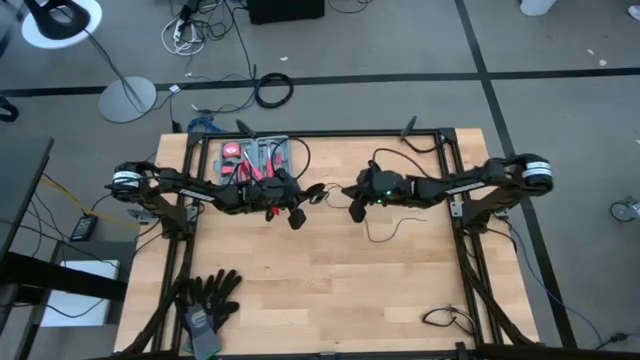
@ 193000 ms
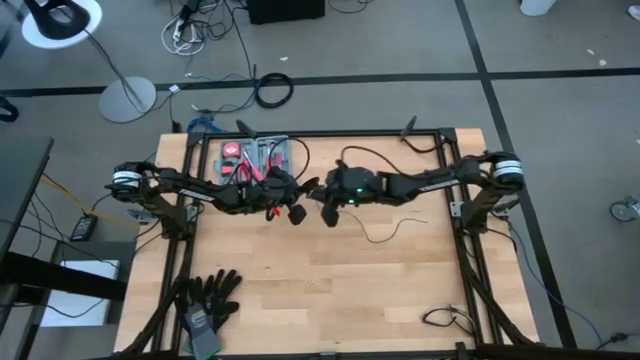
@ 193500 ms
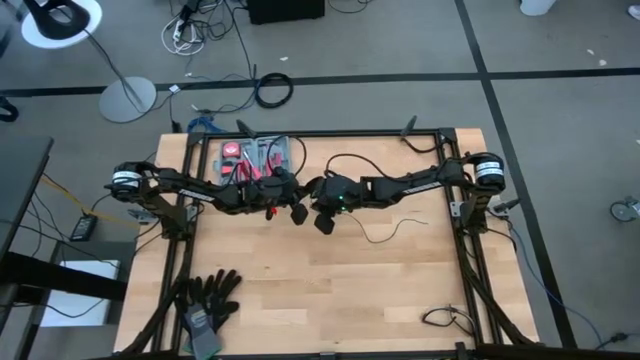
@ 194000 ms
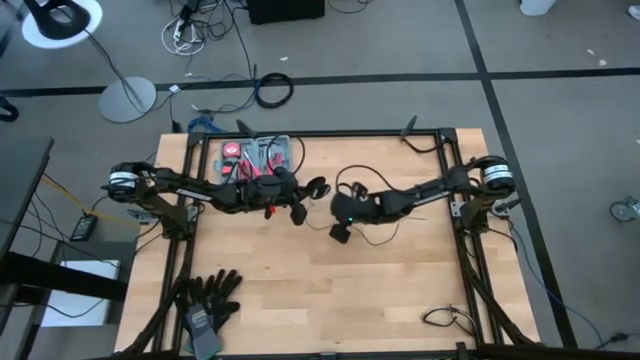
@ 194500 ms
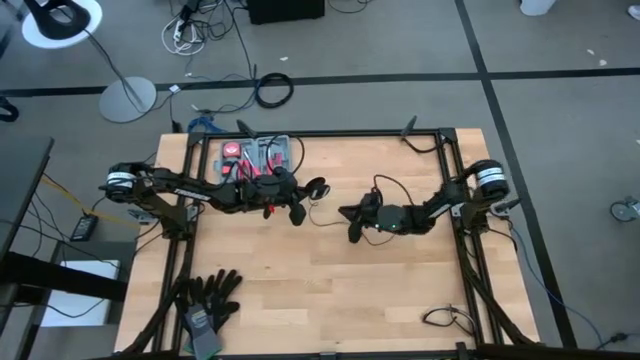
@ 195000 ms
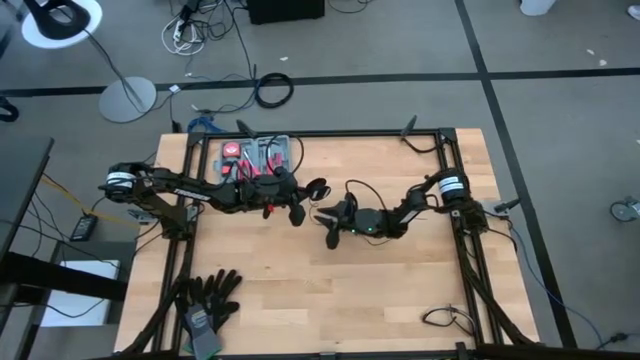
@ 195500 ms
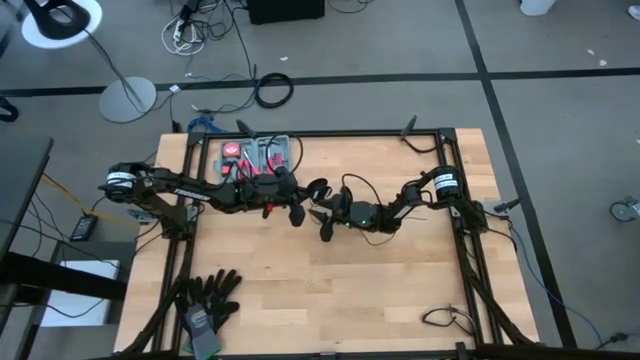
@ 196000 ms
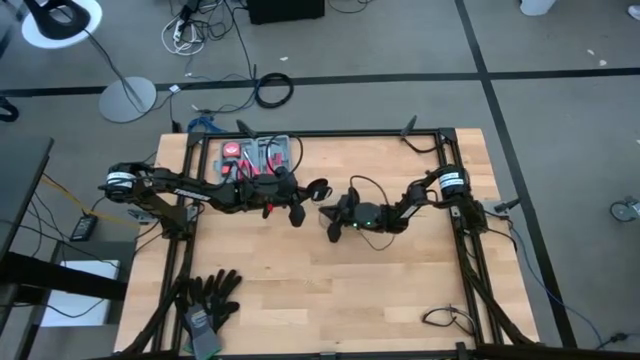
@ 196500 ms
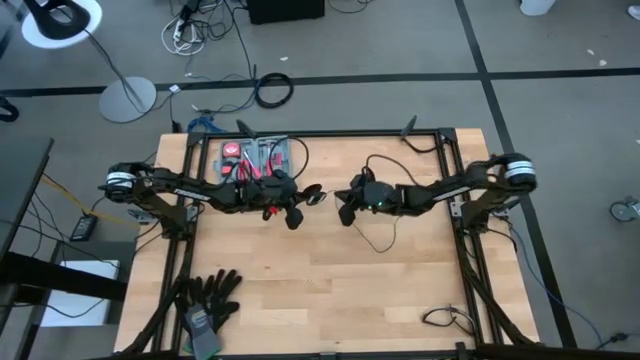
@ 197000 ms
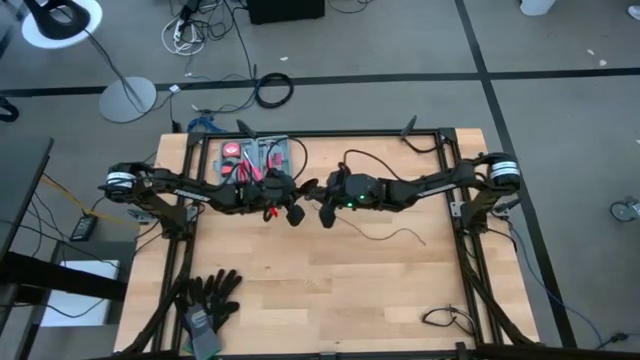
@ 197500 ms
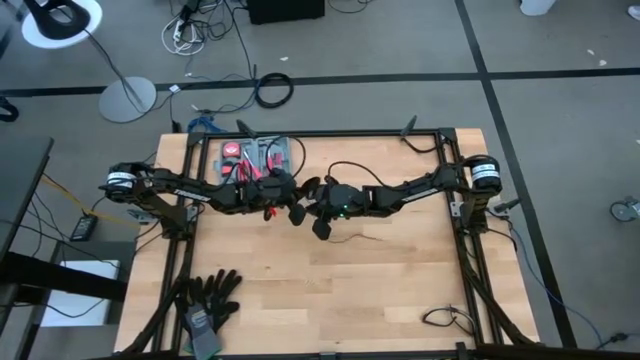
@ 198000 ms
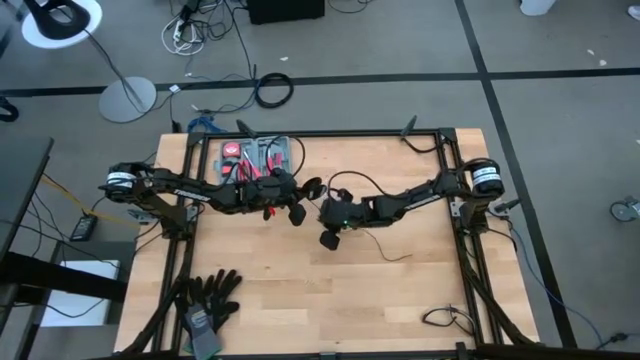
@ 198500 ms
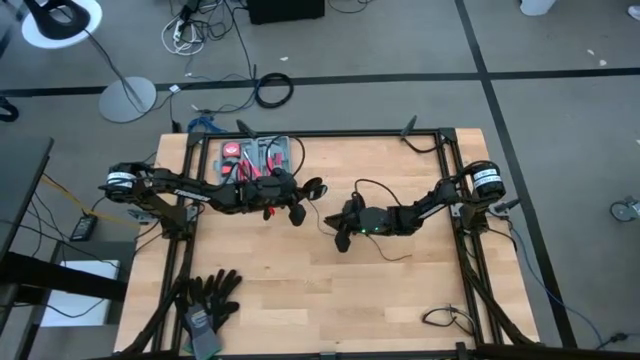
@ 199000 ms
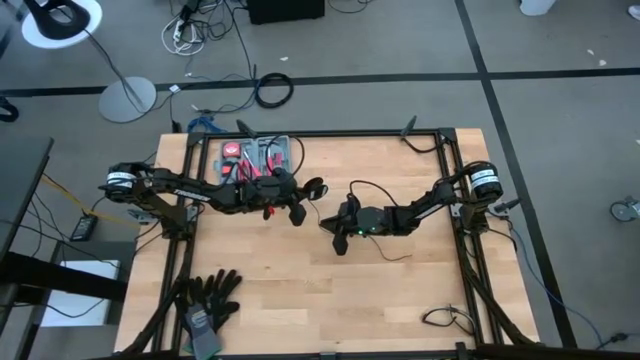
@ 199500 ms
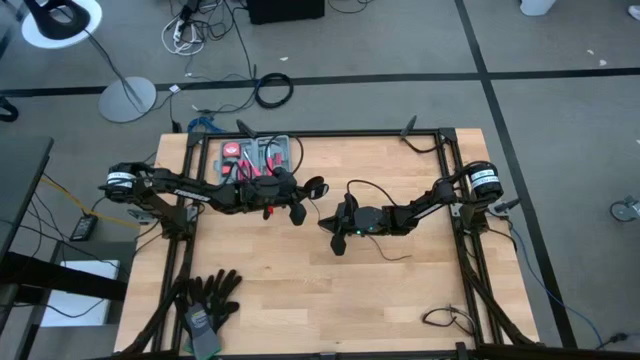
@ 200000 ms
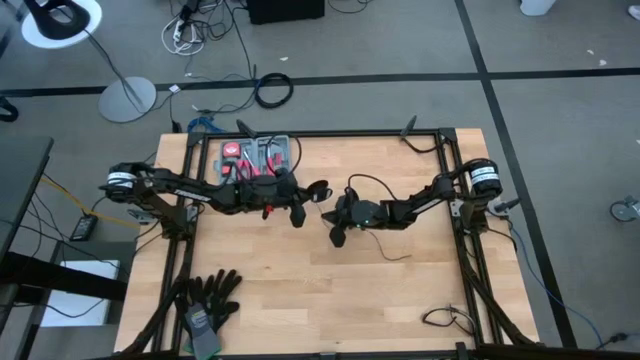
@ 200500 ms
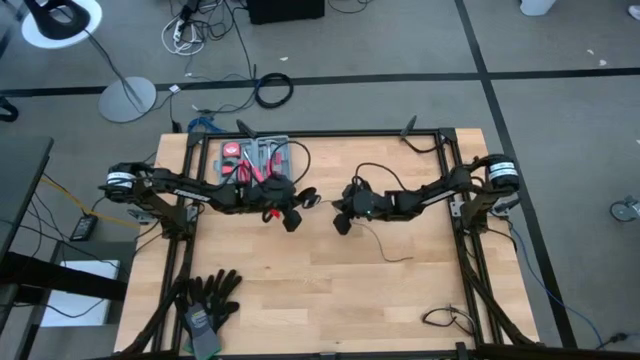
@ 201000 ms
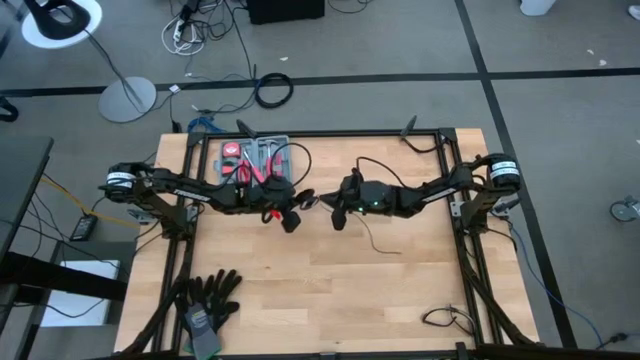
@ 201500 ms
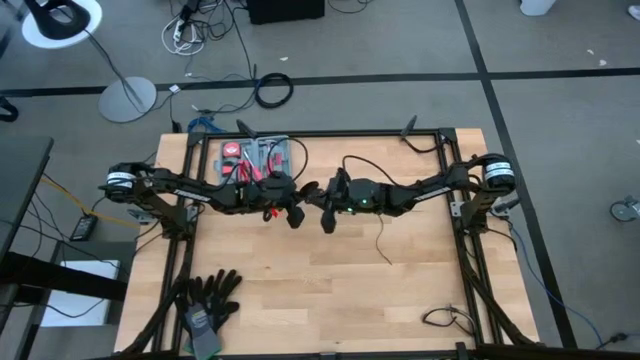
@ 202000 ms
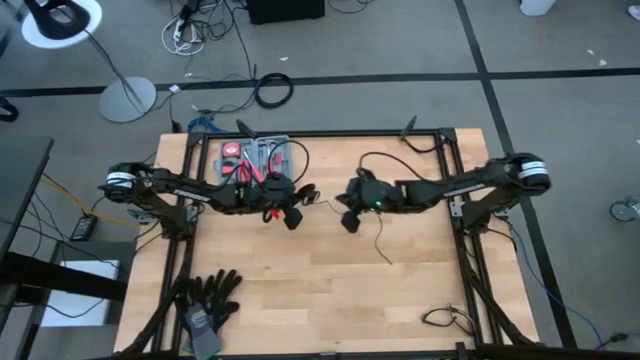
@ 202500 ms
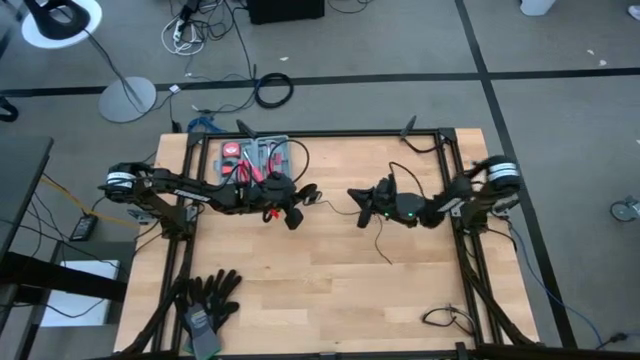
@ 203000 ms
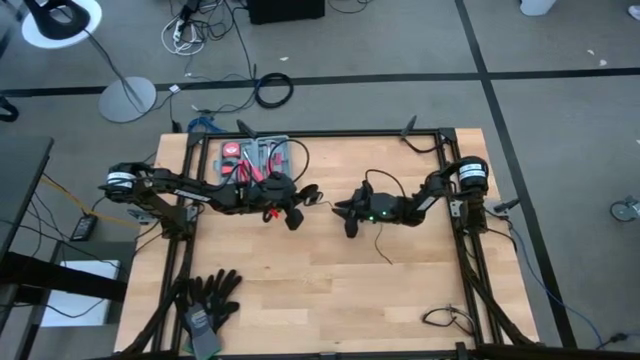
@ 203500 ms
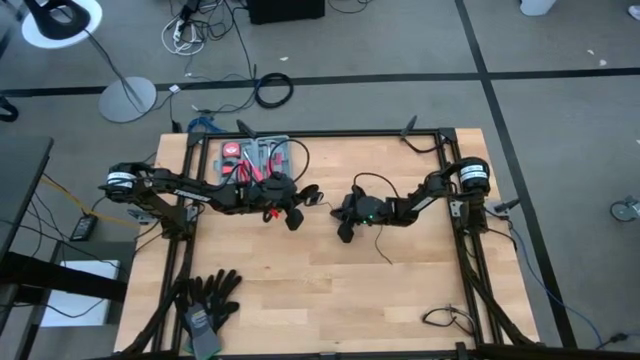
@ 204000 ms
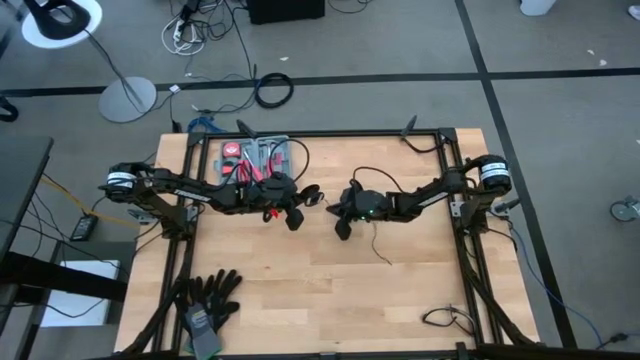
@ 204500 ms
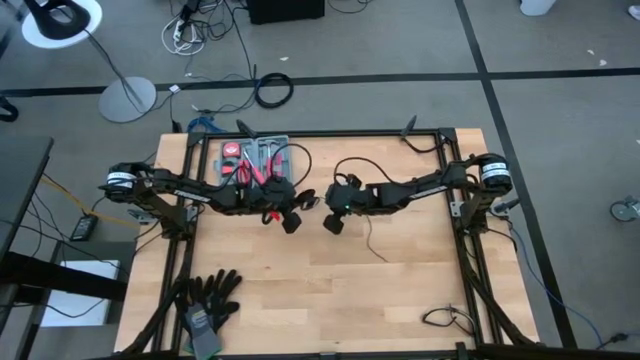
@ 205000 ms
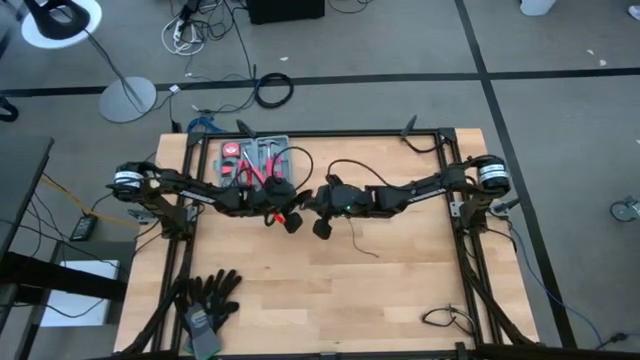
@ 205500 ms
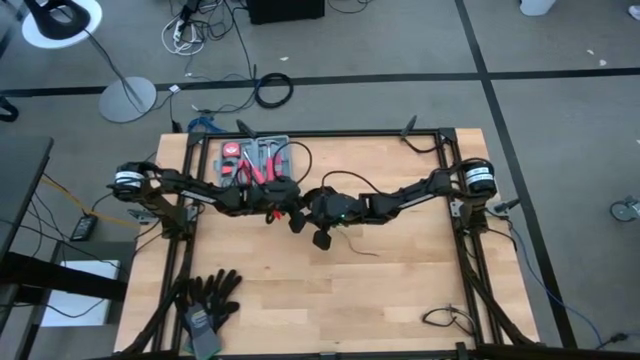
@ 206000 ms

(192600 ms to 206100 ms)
Task: Coil cords
Coil the black cable wire on the spool

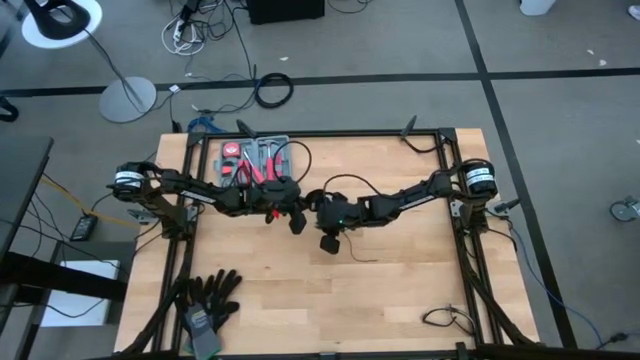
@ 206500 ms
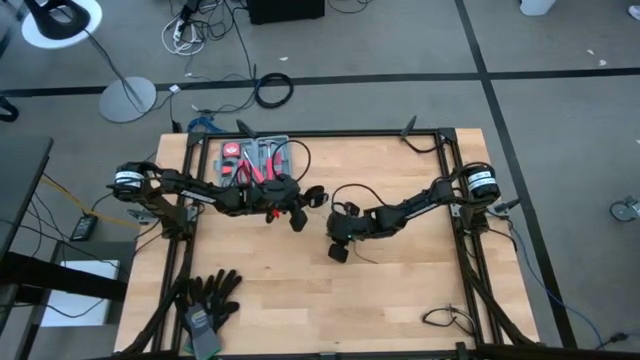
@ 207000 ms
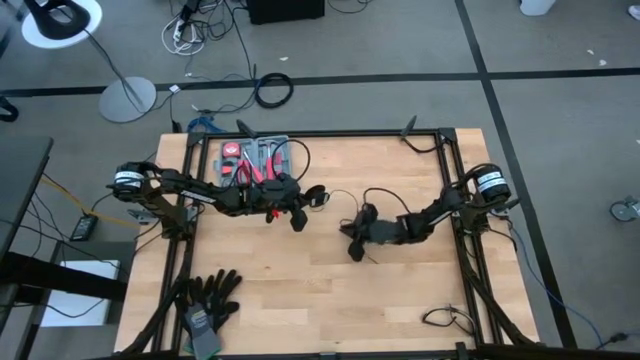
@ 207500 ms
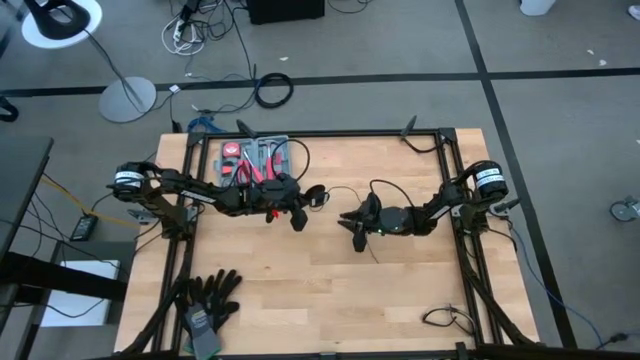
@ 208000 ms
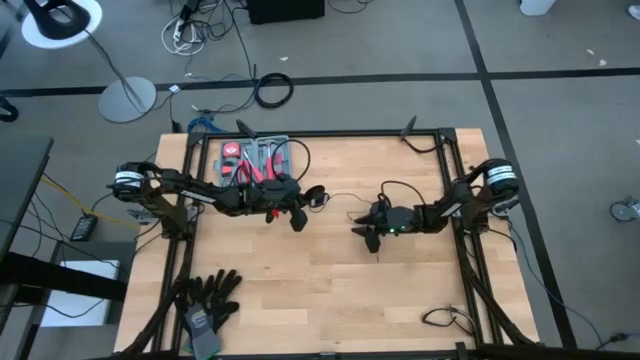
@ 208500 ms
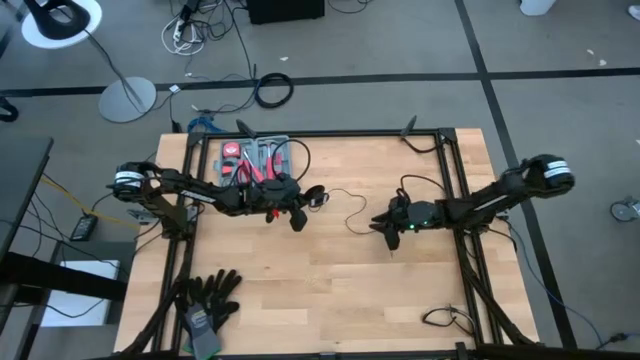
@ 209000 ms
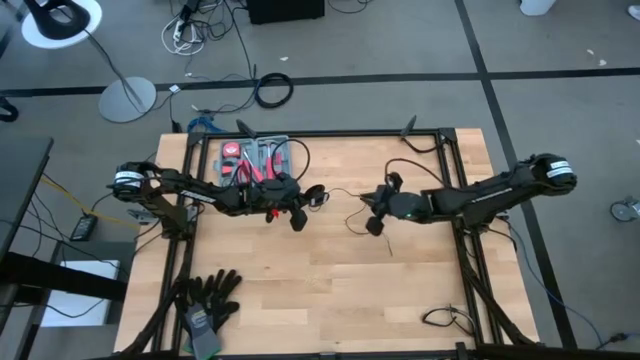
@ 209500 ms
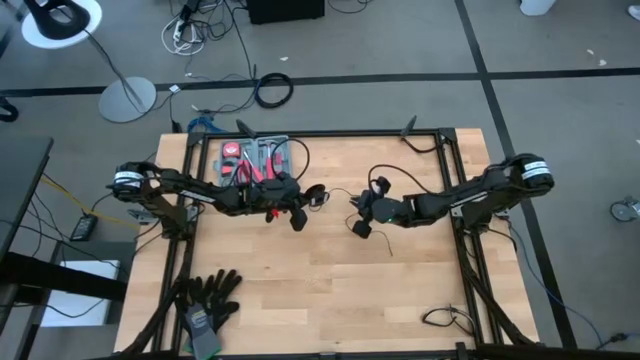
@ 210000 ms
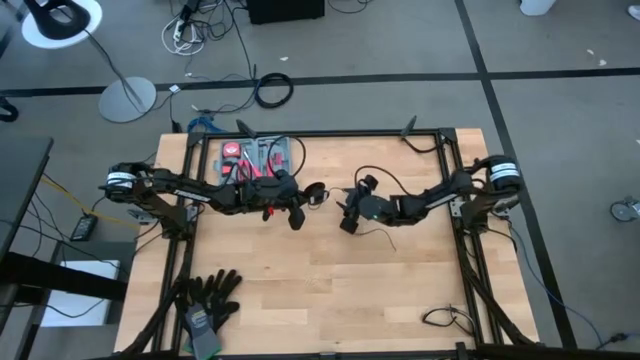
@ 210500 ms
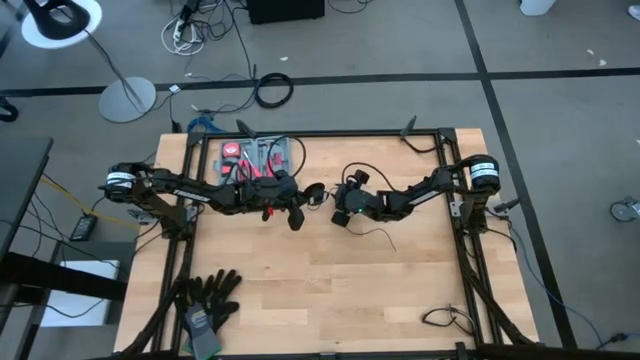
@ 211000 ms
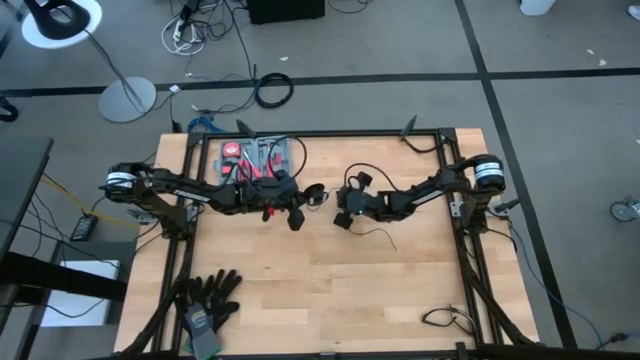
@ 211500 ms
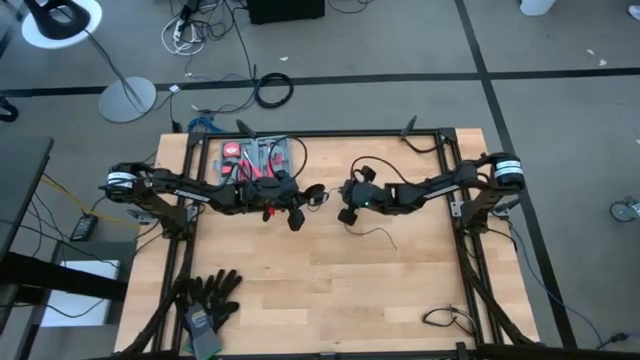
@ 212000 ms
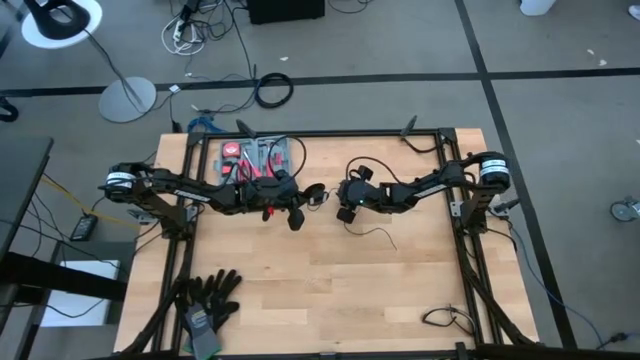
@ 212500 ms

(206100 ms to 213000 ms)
Coil the black cable wire on the spool

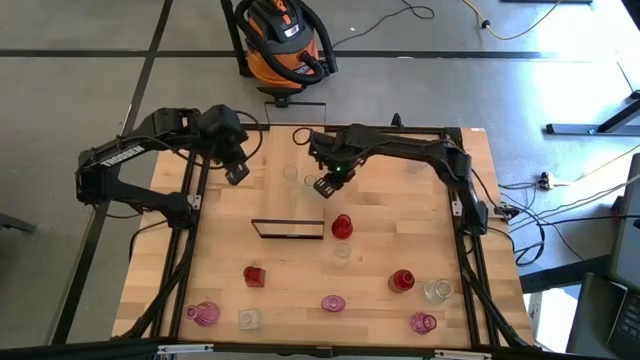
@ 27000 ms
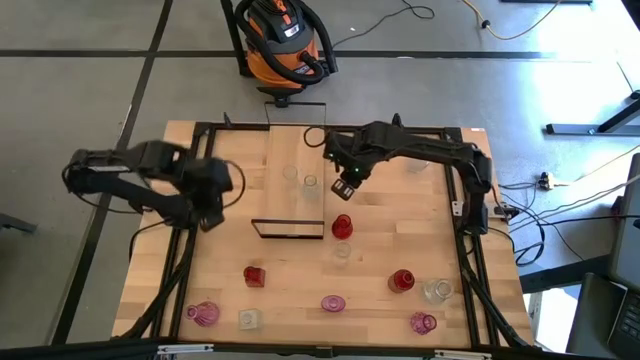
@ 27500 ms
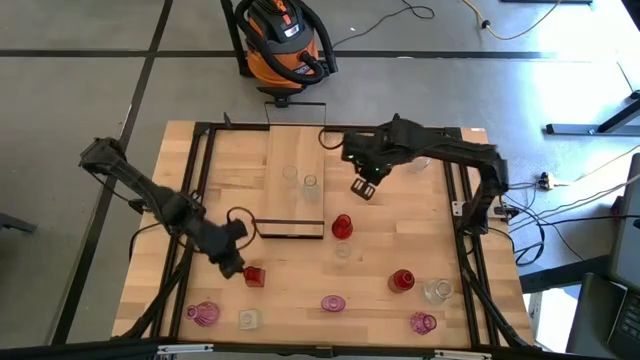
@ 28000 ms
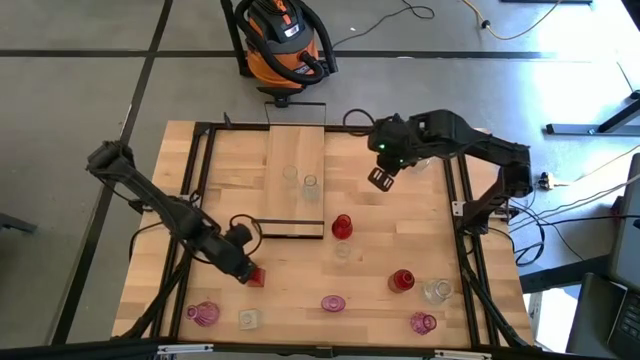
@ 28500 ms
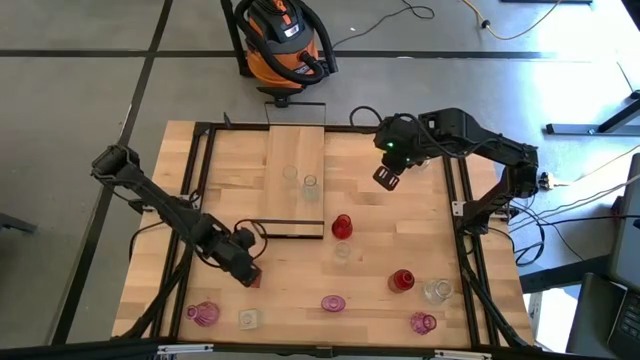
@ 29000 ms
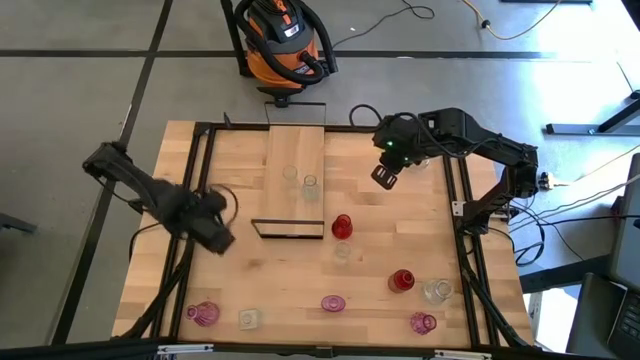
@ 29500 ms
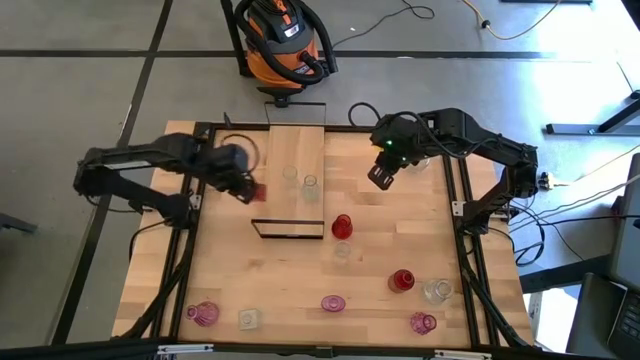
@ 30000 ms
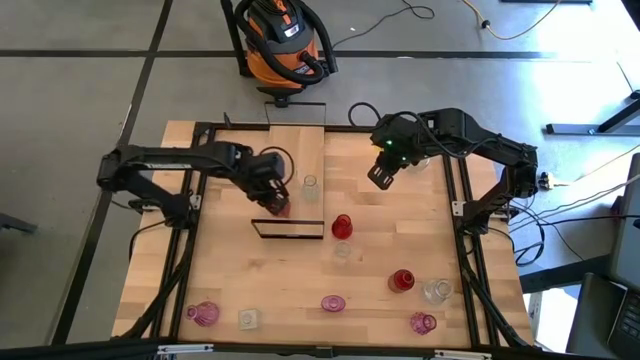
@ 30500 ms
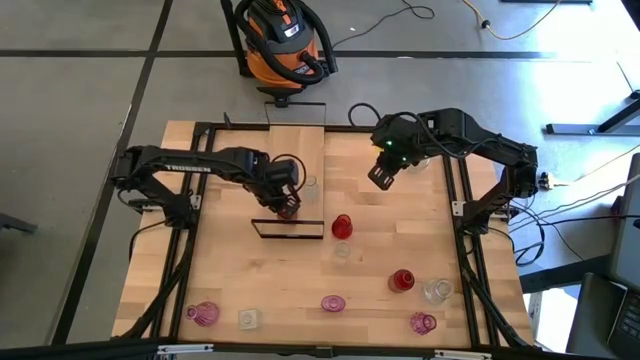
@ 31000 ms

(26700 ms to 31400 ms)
Task: sort vases onto shelf
Put the red vase on the shelf
